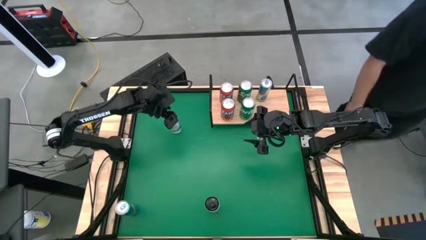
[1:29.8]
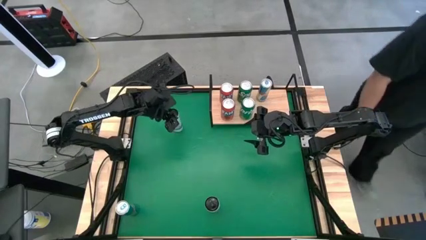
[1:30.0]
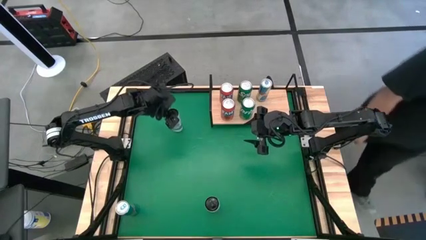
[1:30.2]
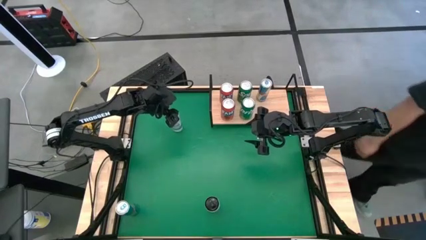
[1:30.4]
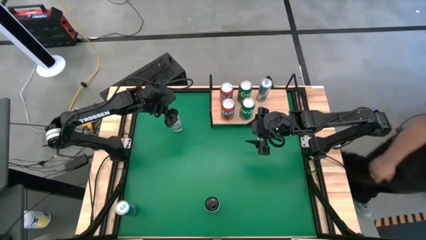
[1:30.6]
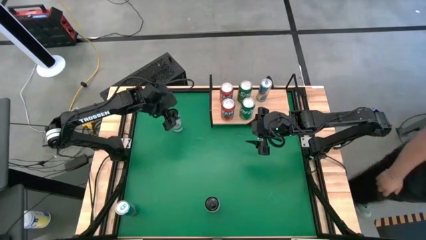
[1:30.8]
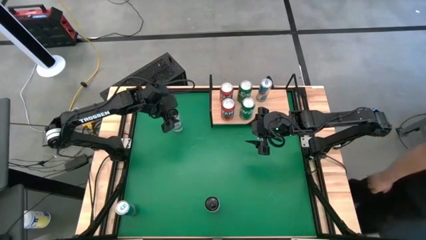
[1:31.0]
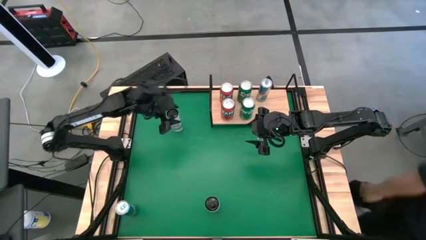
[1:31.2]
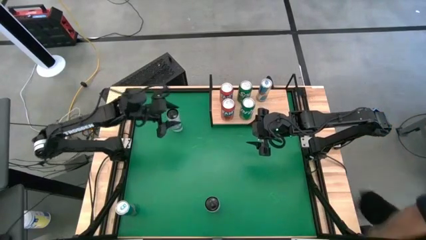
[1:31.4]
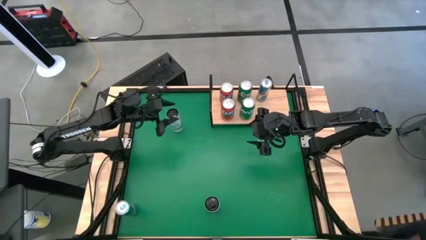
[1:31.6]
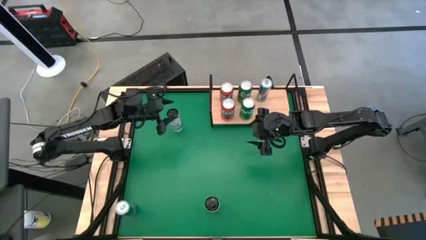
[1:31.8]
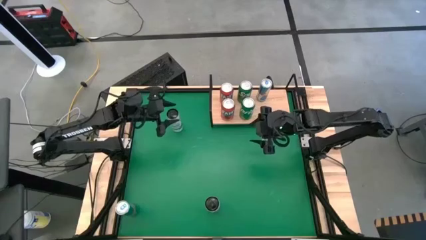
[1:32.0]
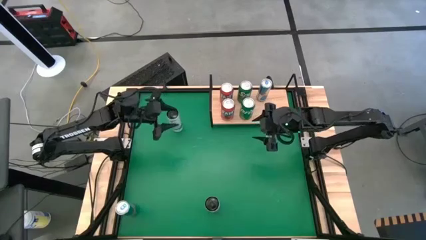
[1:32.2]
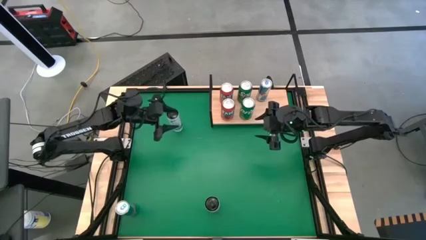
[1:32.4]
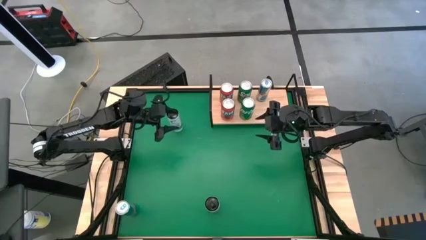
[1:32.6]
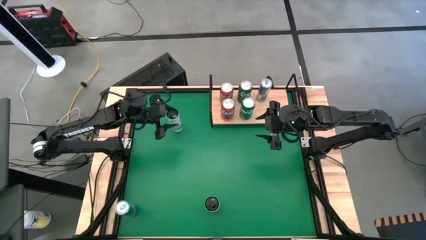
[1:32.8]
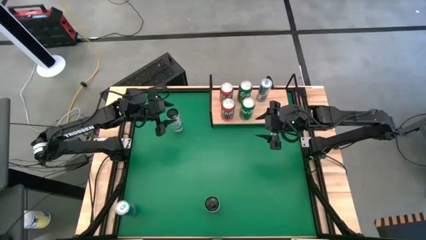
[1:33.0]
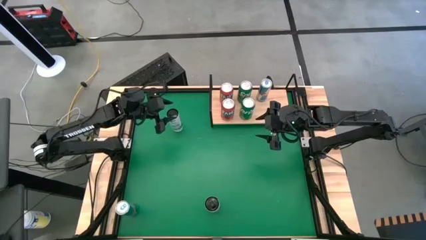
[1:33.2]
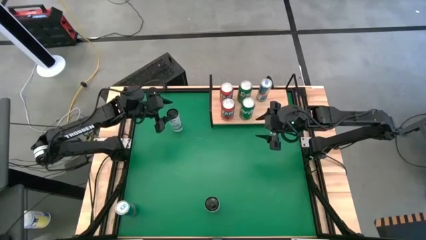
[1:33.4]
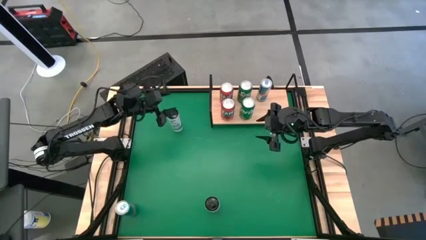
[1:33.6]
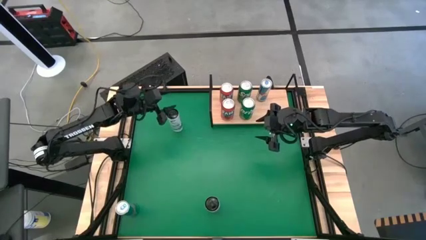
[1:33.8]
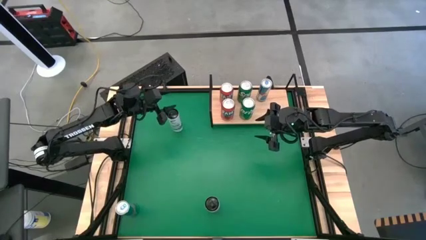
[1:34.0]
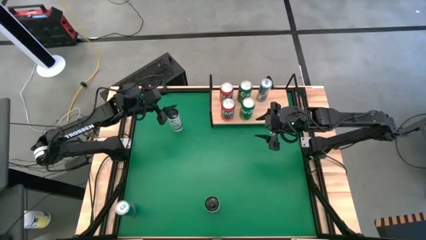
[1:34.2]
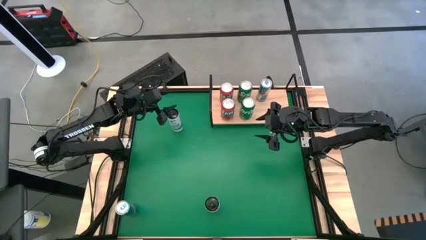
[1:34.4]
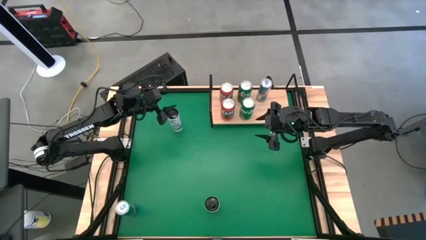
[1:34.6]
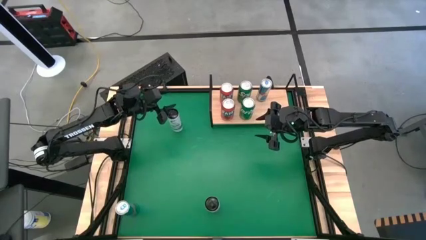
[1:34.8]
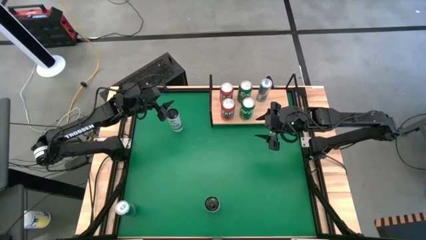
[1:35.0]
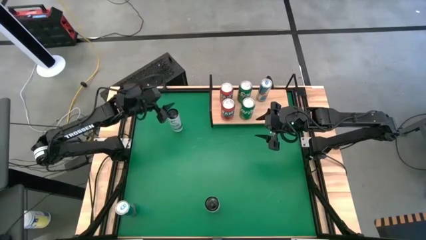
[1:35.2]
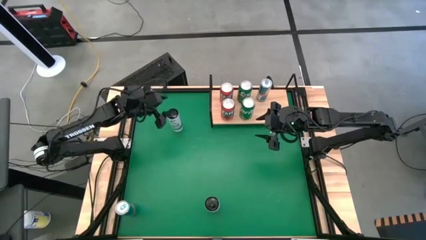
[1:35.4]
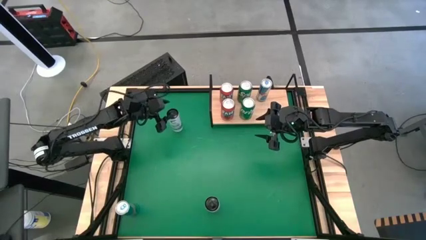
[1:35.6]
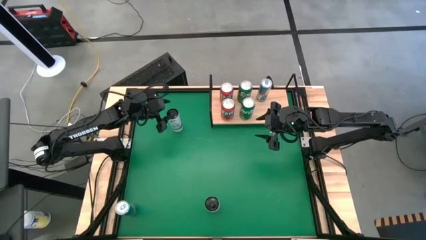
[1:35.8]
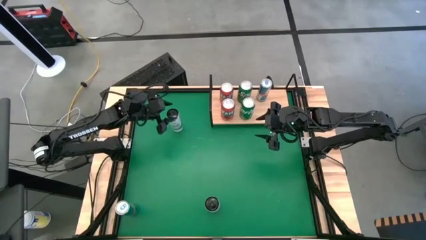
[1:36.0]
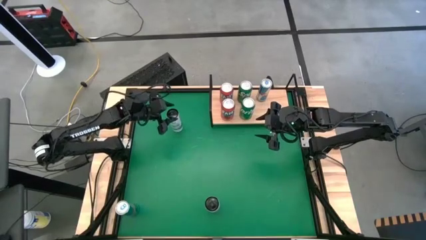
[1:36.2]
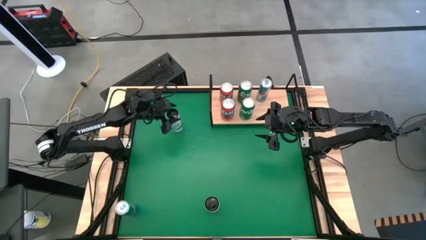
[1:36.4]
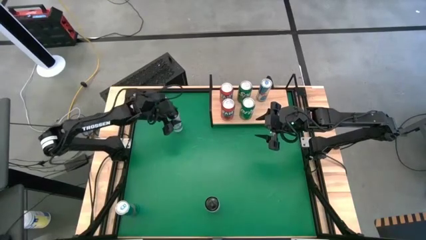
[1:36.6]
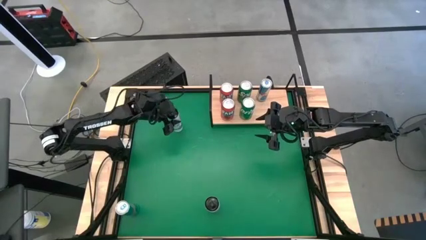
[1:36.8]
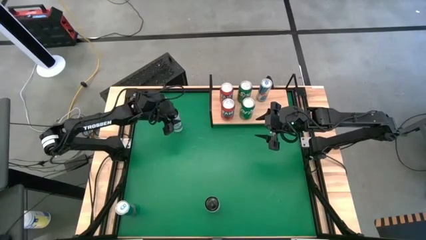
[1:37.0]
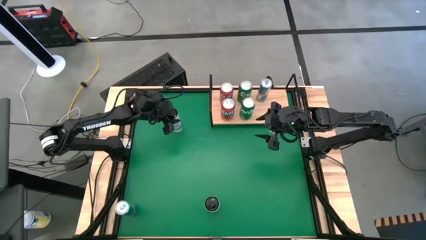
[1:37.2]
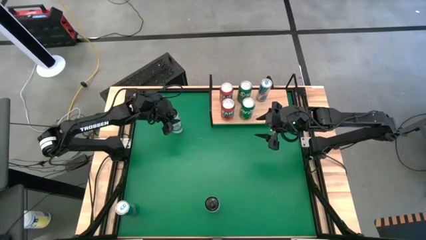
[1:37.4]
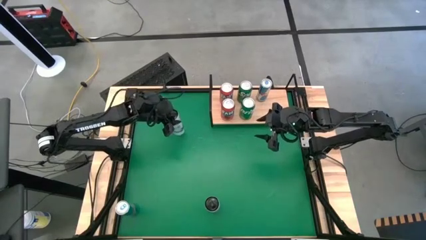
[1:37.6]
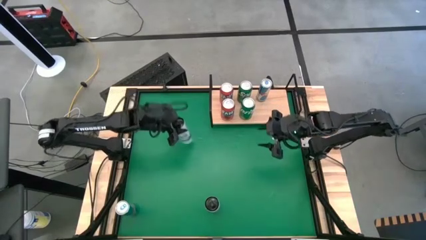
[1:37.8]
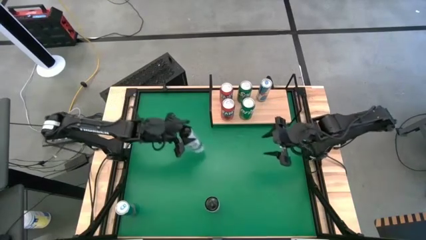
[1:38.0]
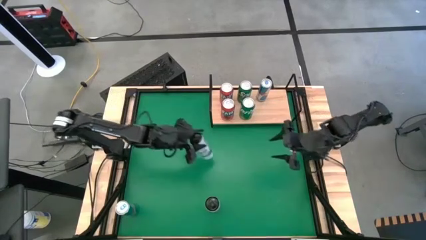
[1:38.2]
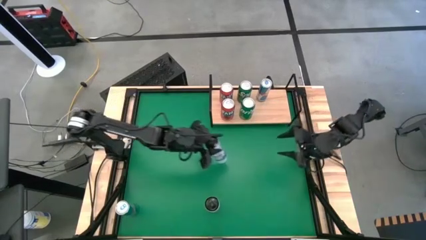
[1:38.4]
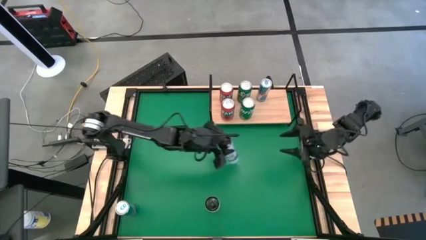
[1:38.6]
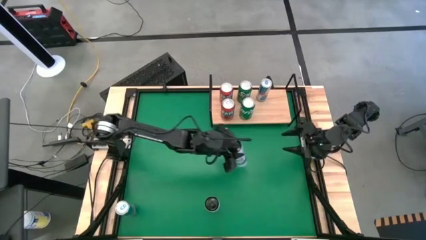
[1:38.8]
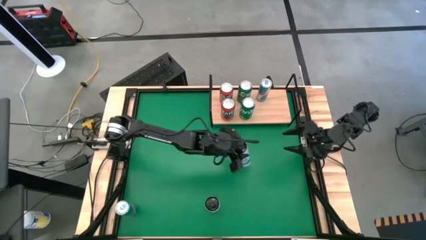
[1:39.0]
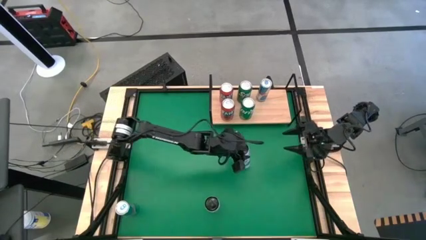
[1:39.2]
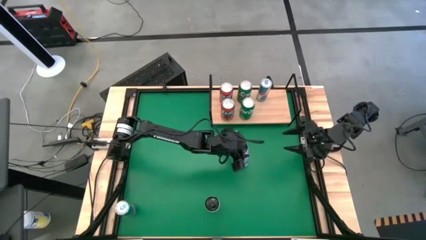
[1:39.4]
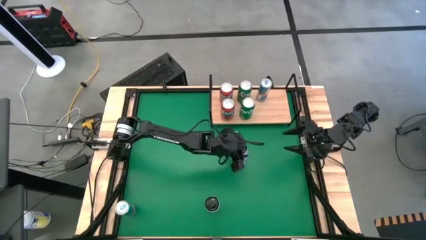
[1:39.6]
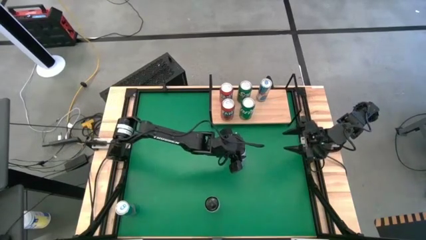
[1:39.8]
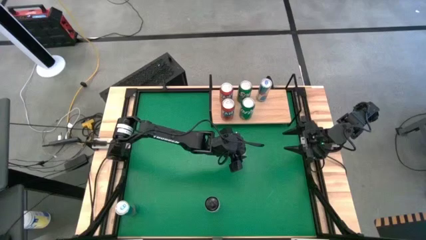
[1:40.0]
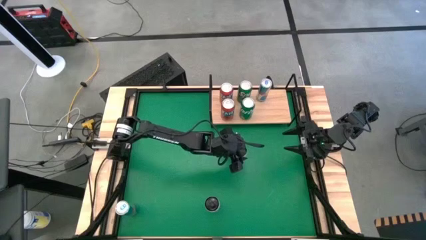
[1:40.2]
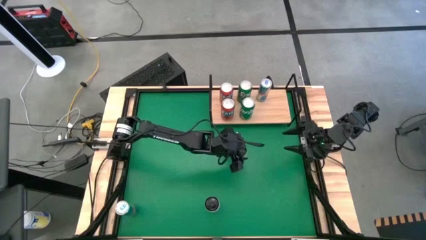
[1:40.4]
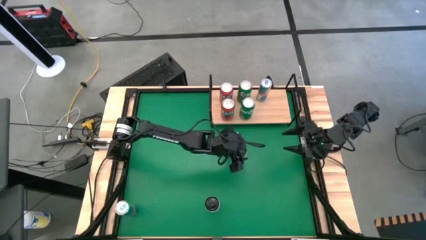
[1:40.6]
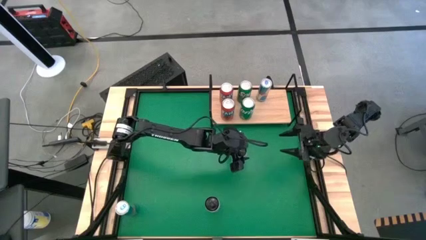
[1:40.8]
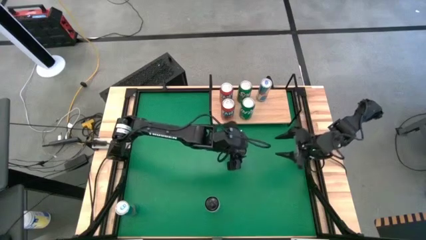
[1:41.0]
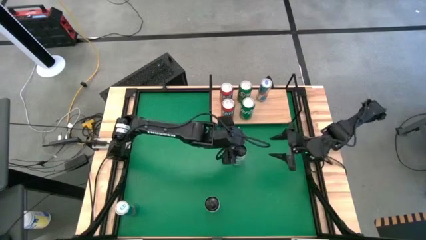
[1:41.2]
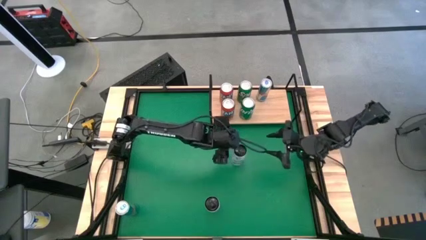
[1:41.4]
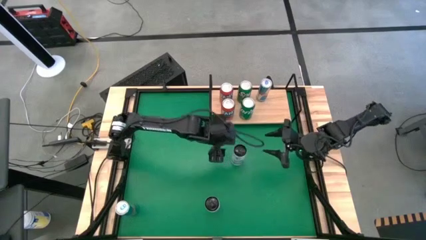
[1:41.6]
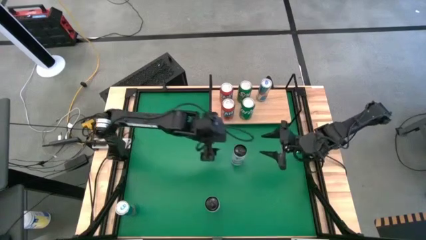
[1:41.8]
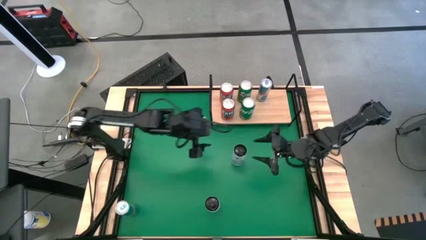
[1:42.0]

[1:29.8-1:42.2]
Task: Place canned beverage on shelf
Put the top white-blue soda can on the shelf
